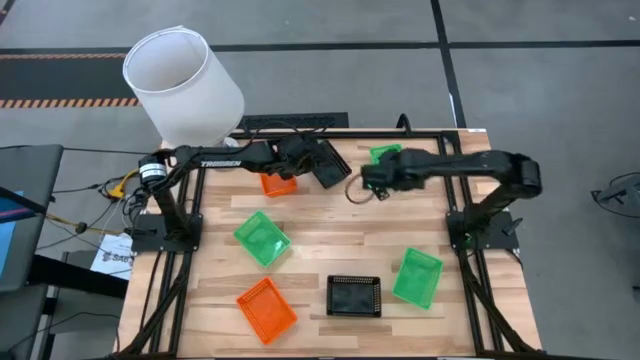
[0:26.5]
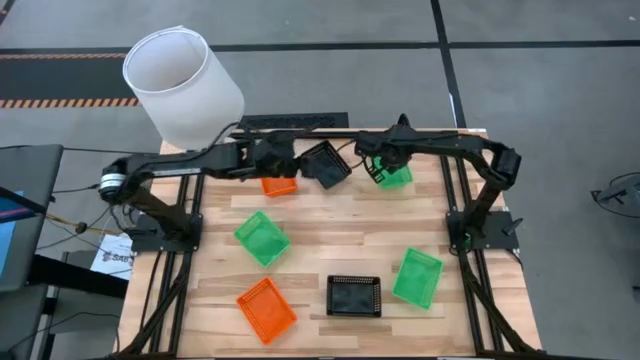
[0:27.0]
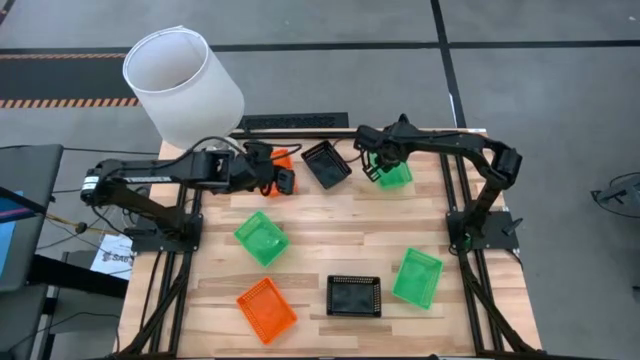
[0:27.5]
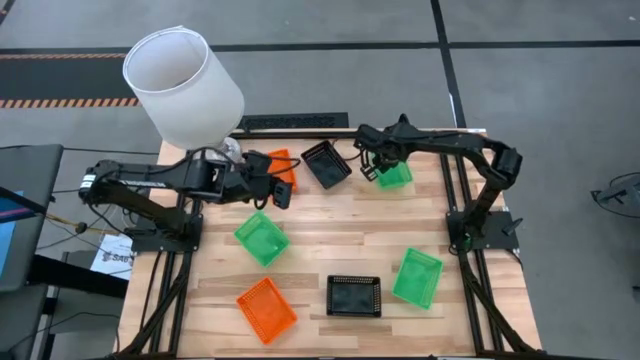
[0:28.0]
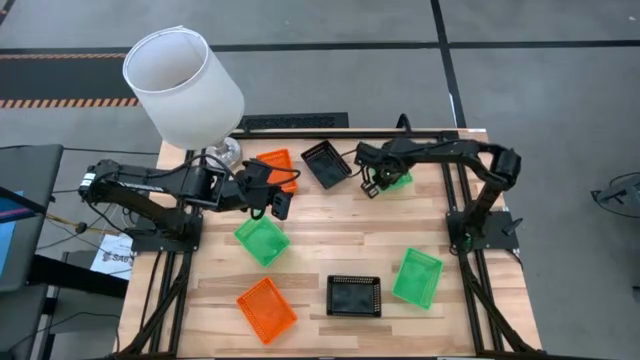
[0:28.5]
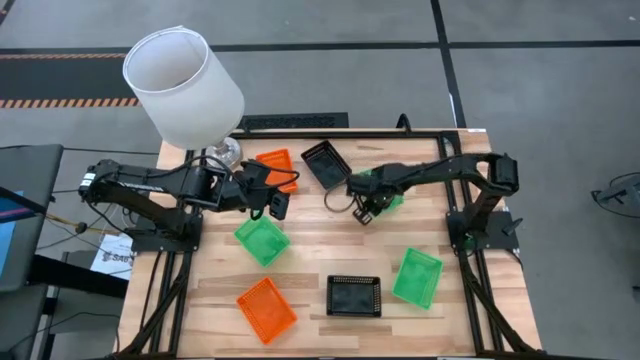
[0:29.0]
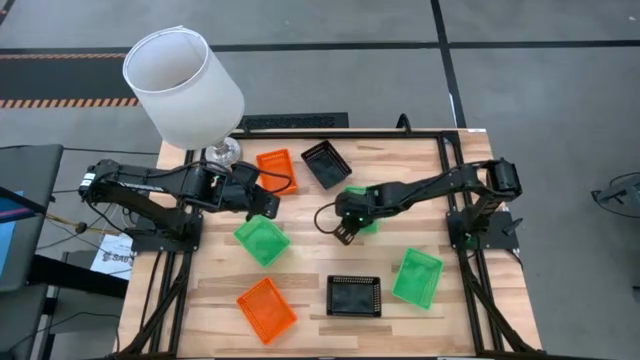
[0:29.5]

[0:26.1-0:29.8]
Move the top green bin to the center of the table

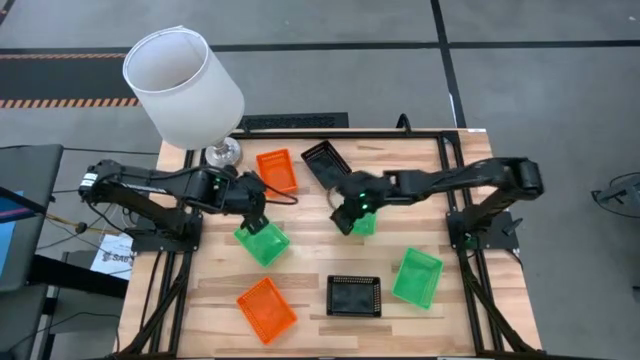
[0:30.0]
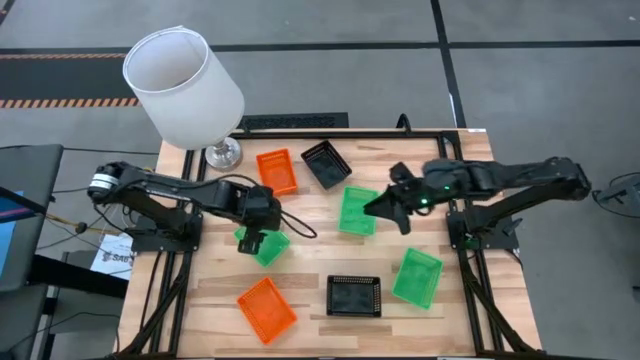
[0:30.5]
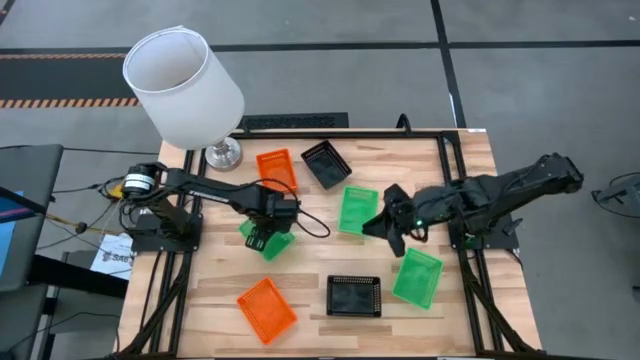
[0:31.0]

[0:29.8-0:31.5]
Stack the top left green bin on top of the top right green bin

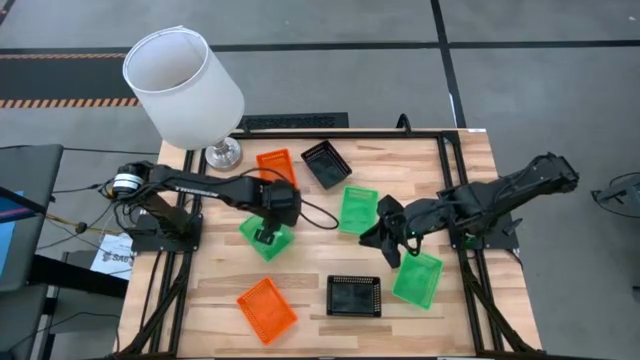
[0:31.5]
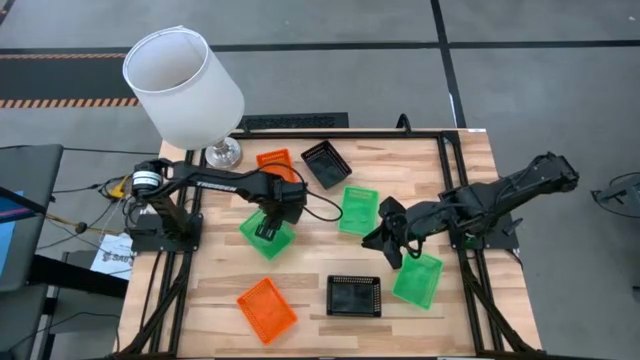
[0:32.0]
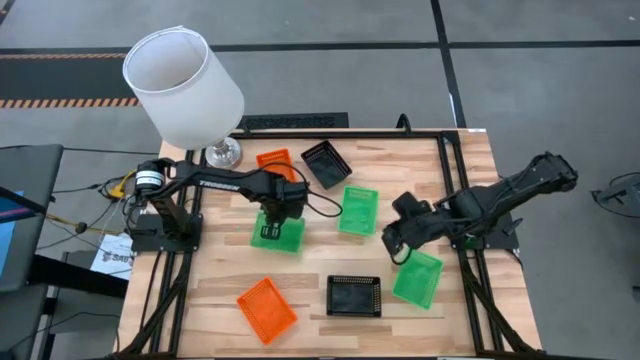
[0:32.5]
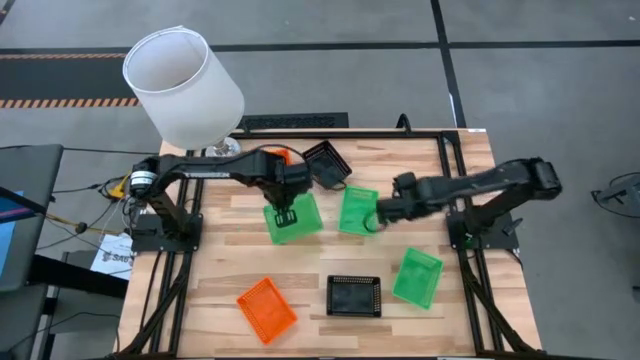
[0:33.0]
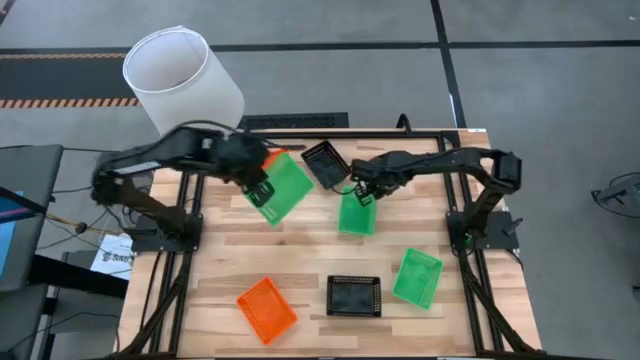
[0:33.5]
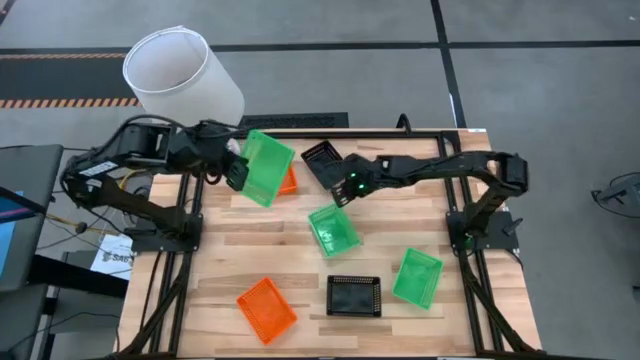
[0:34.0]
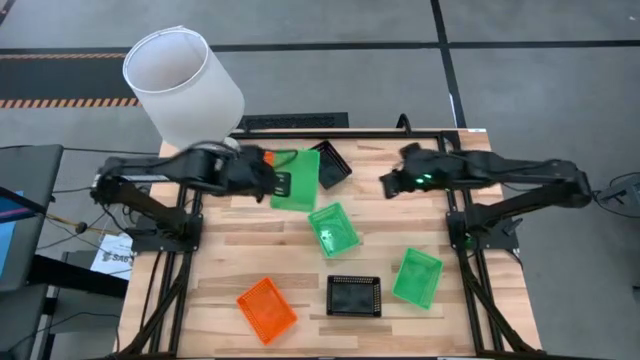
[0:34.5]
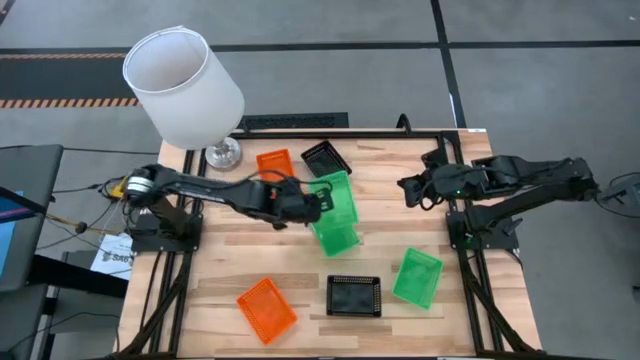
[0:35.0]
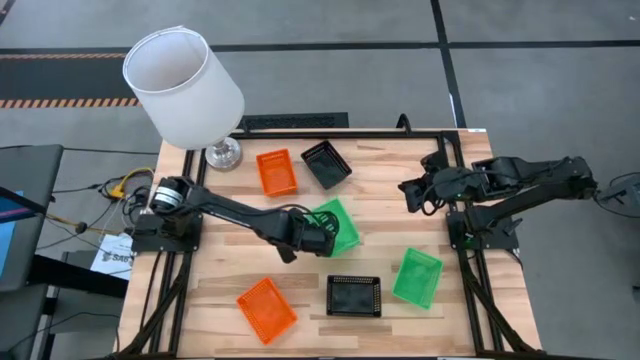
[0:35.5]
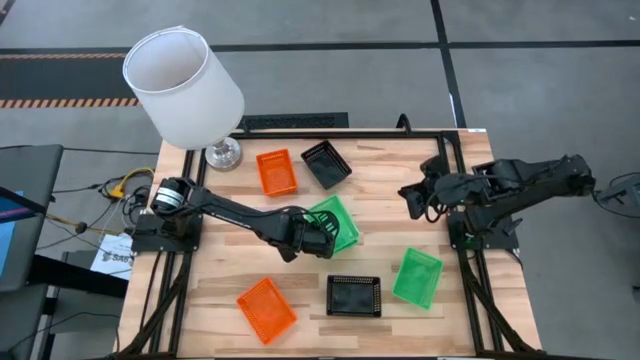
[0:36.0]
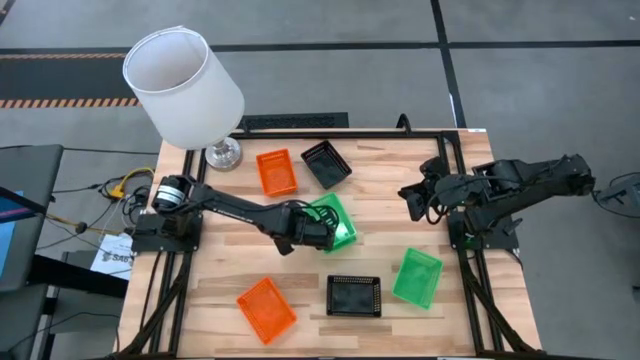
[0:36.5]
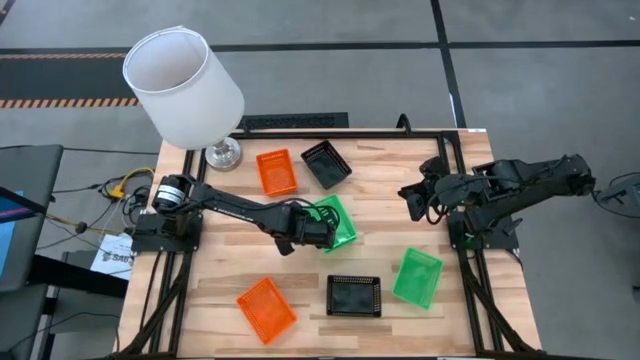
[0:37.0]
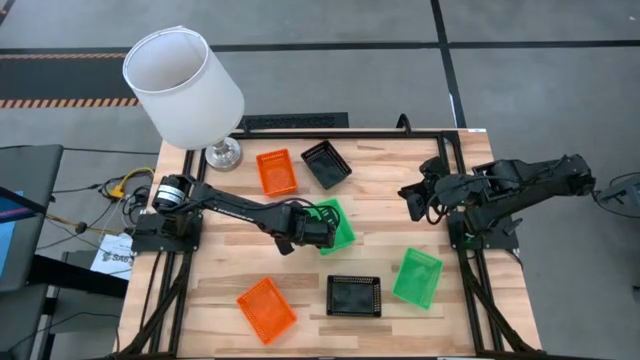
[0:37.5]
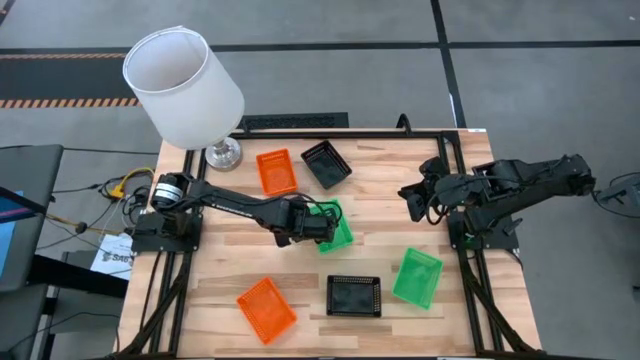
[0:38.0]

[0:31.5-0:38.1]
Stack the top left green bin on top of the top right green bin

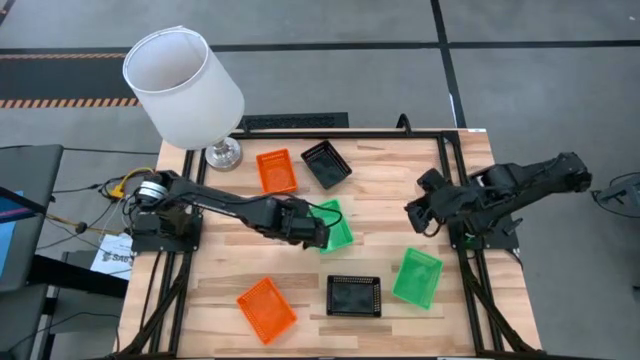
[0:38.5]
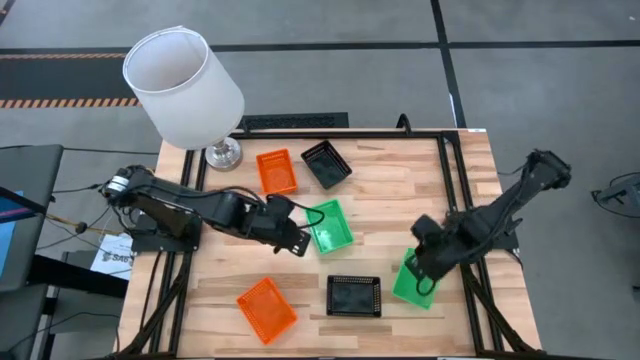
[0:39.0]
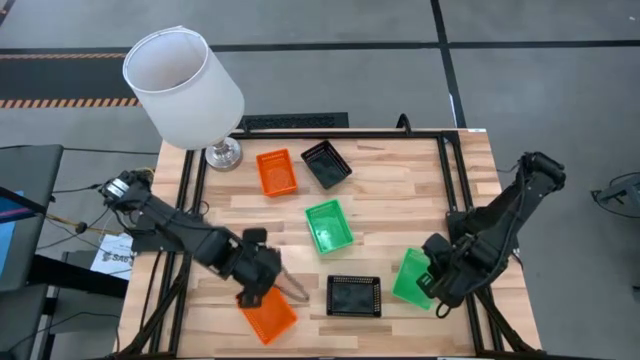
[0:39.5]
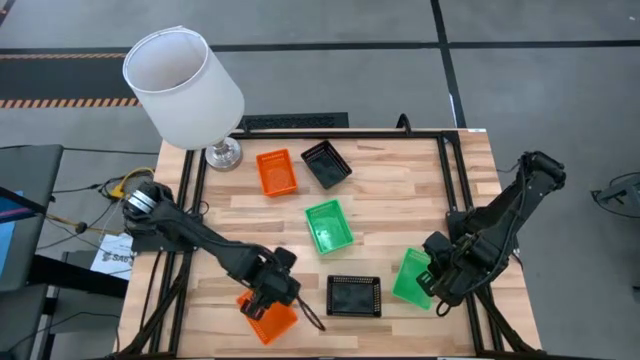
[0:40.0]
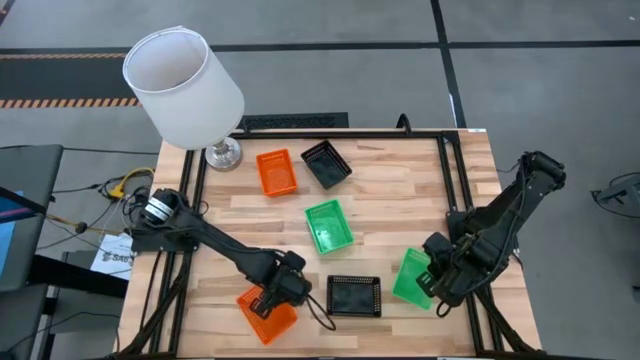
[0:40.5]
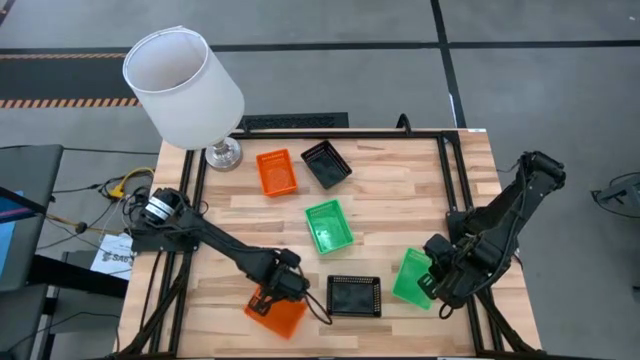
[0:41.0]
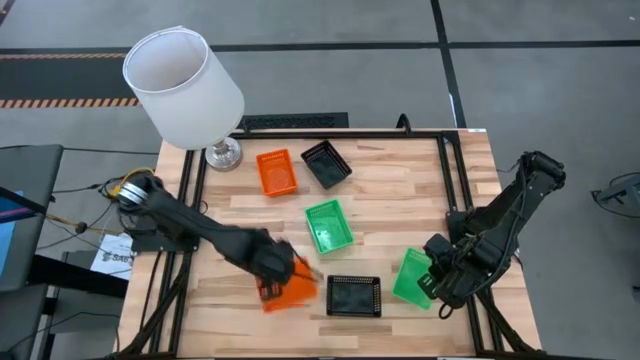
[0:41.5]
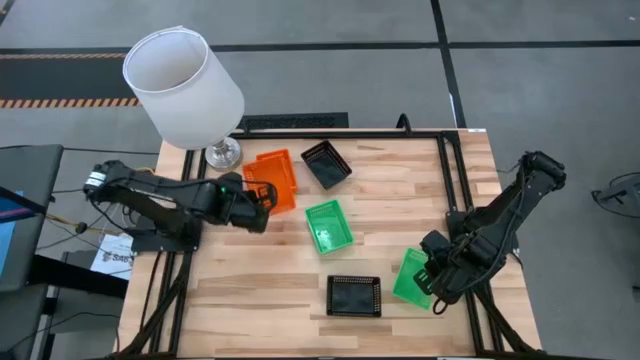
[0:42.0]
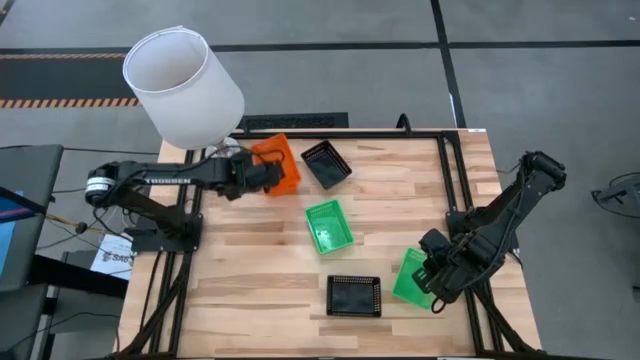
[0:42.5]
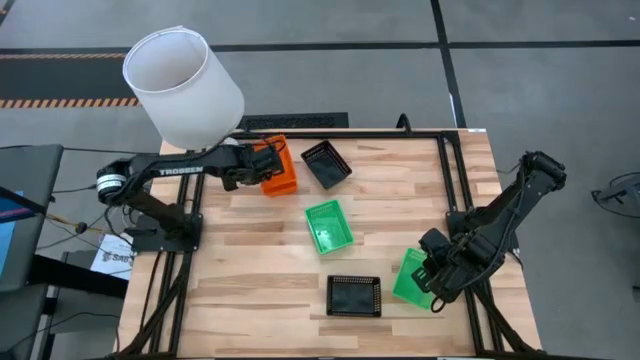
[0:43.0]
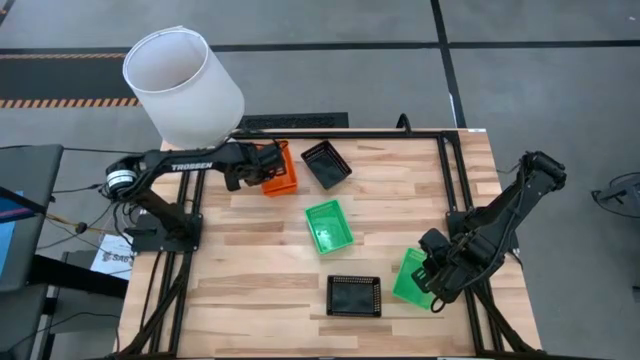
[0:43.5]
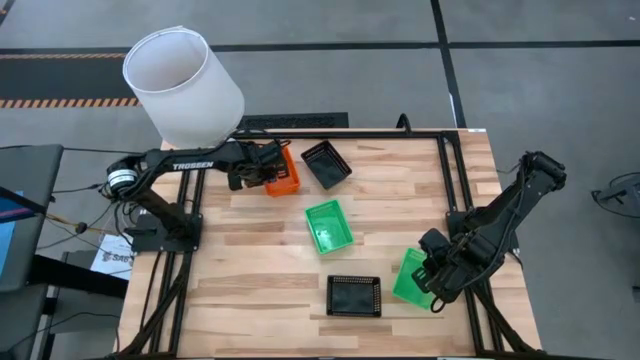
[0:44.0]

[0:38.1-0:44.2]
Stack the orange bin on top of the stacked orange bins
